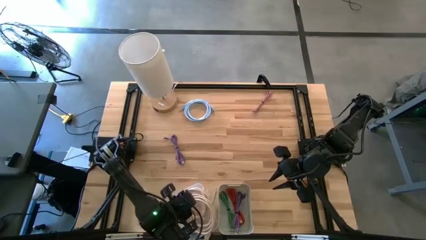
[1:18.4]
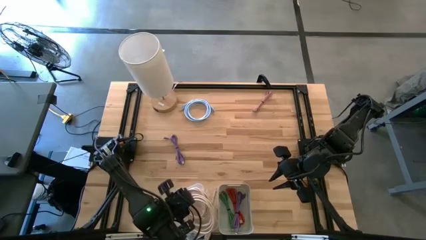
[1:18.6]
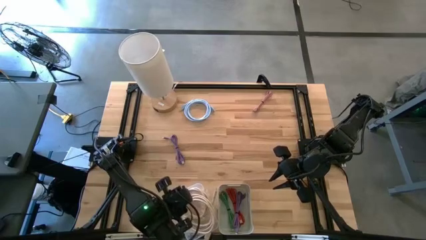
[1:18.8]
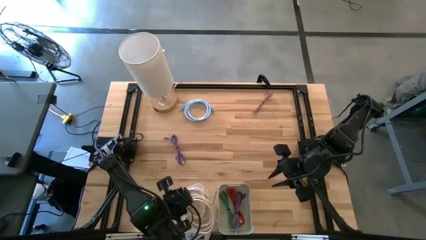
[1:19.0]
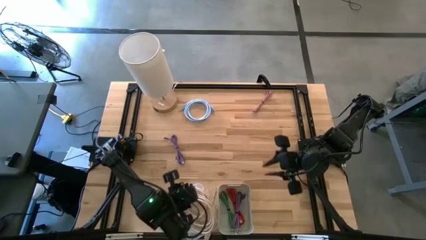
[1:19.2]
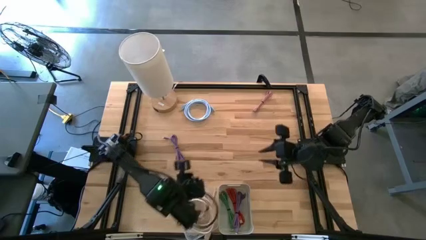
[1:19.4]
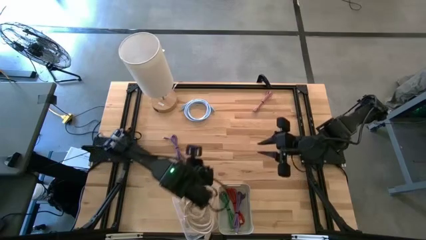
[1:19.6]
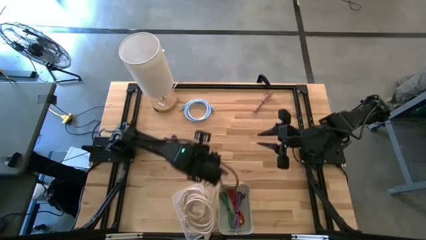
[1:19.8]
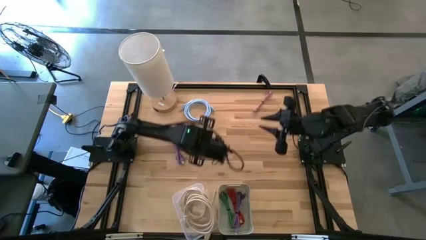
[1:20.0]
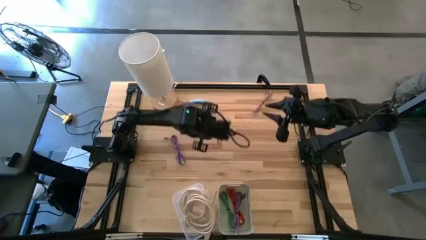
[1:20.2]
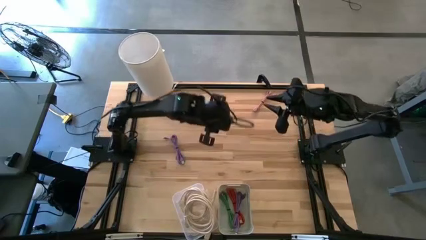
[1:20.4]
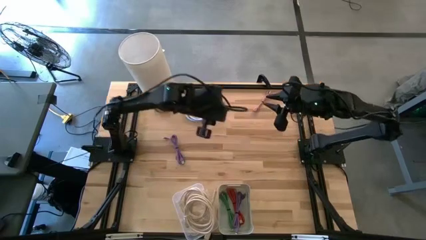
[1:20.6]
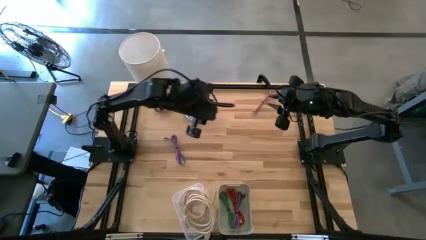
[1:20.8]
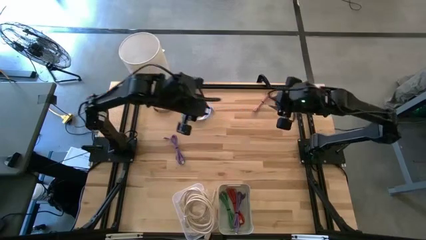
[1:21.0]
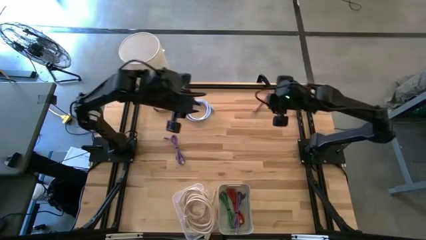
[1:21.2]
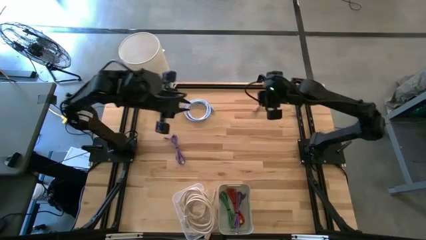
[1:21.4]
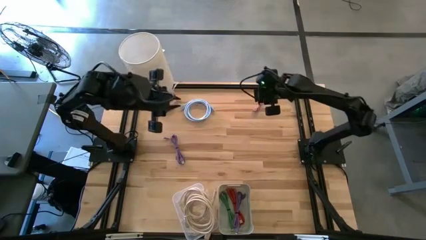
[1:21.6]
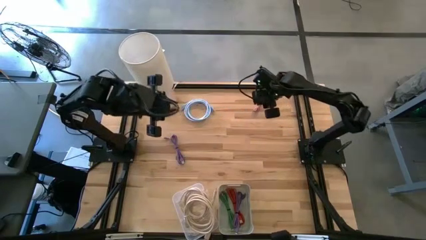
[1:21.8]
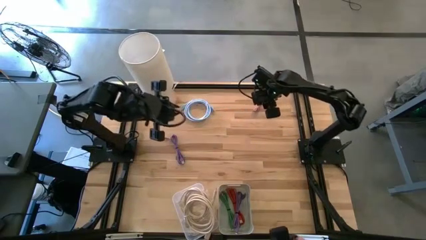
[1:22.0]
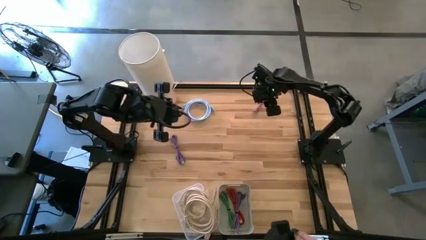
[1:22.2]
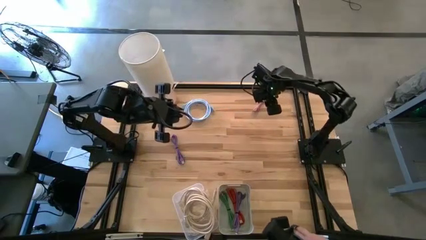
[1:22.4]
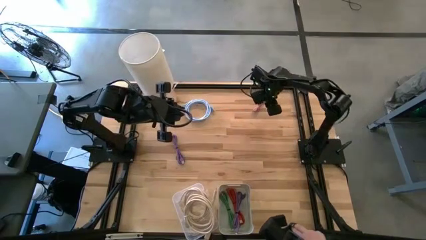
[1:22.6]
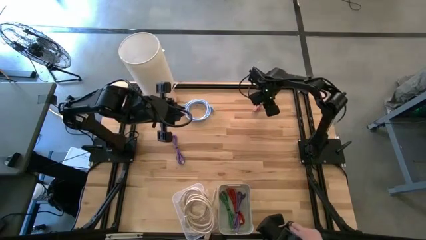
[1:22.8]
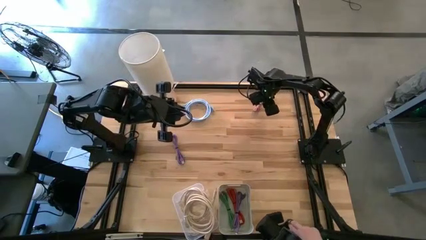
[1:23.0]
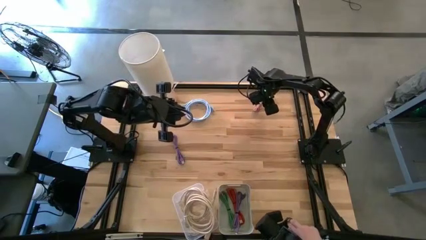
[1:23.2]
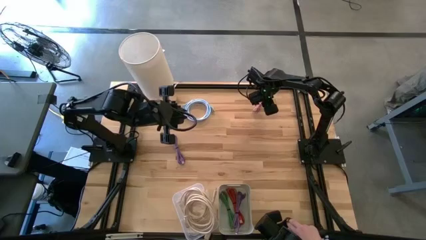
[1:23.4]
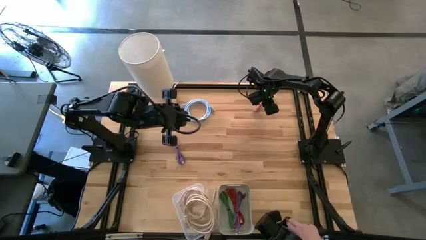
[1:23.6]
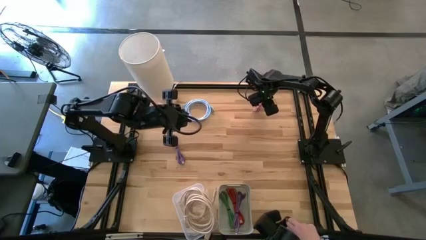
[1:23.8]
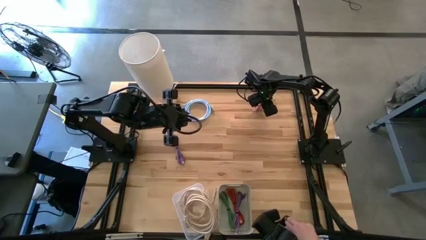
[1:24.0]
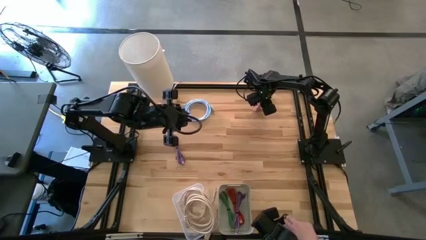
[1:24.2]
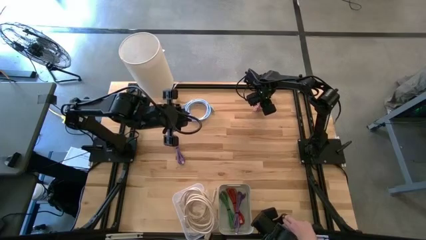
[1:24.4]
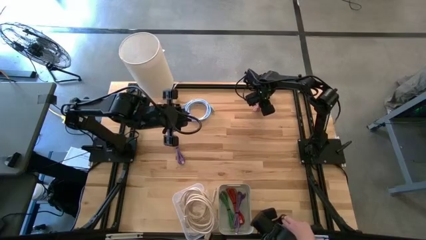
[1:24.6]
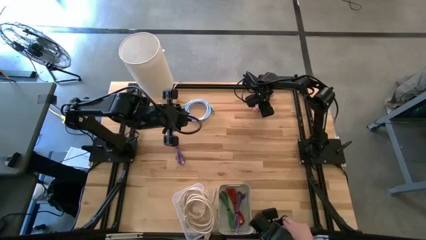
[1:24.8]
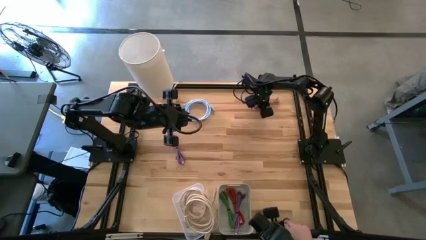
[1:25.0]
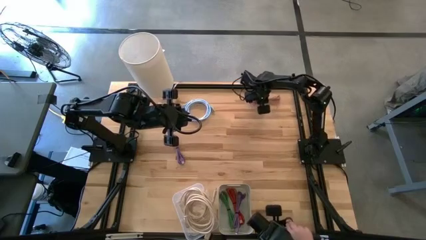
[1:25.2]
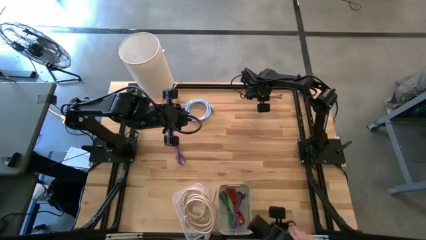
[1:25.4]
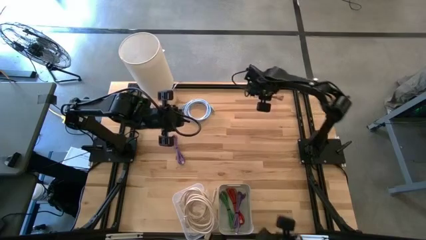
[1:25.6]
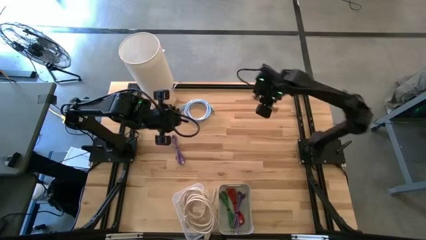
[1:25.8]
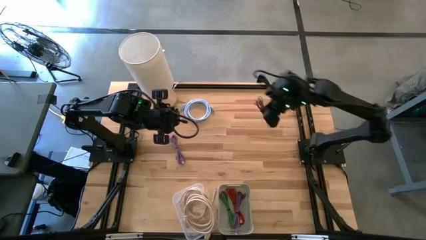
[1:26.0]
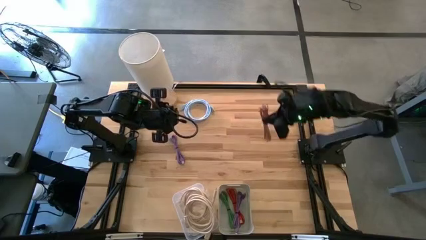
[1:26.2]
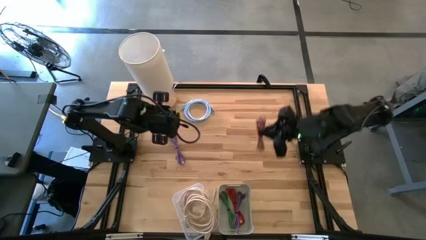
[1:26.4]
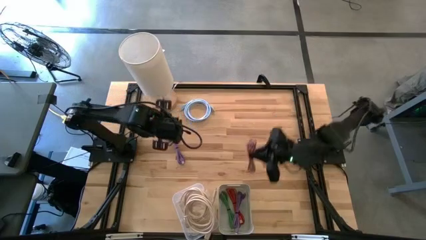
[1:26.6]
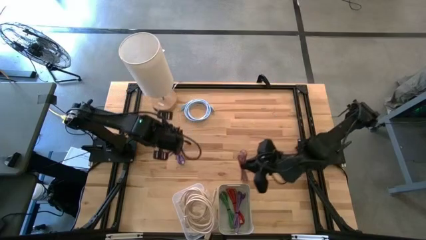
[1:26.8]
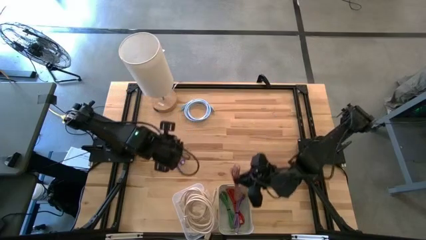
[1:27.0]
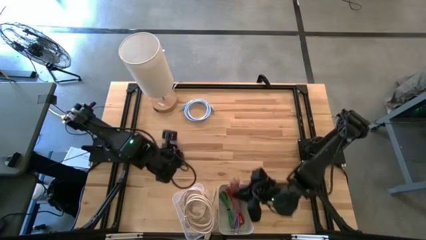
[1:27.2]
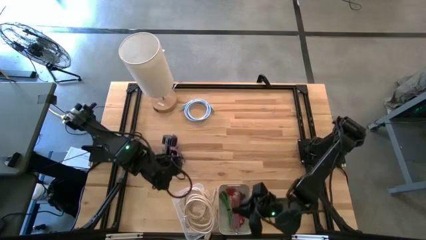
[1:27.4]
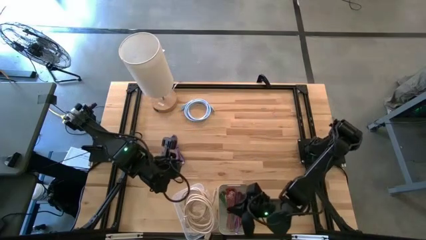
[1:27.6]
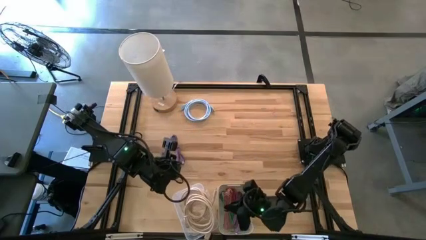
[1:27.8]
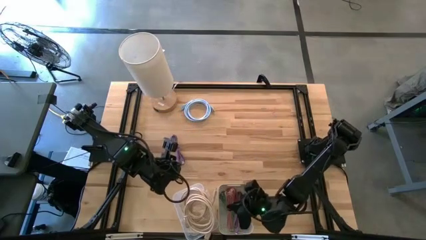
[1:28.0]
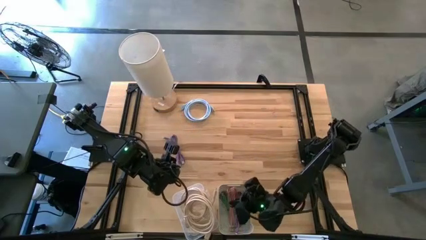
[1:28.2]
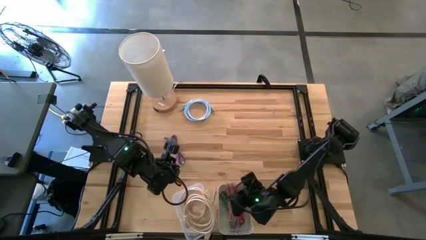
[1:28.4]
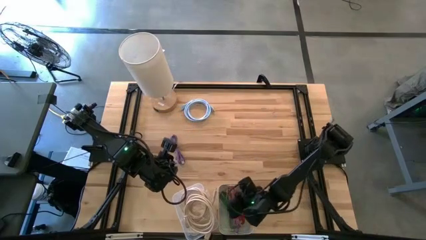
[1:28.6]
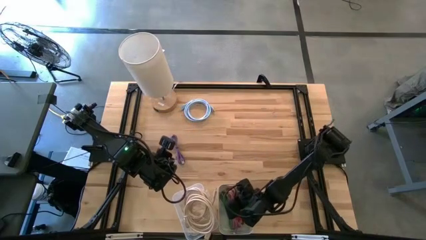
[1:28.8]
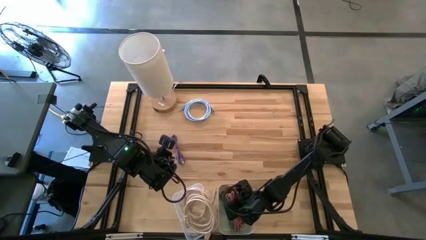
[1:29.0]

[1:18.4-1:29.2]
Task: Pick & Place USB Port
Put the pink USB cable into the white bin
